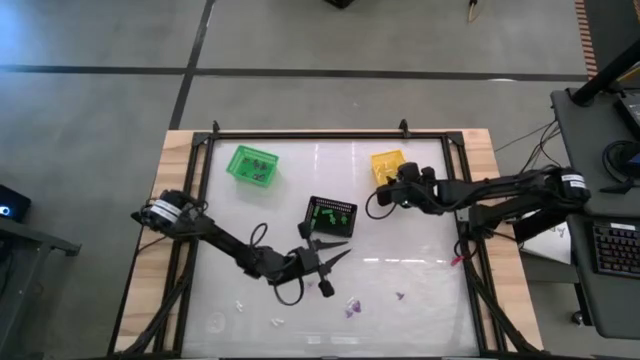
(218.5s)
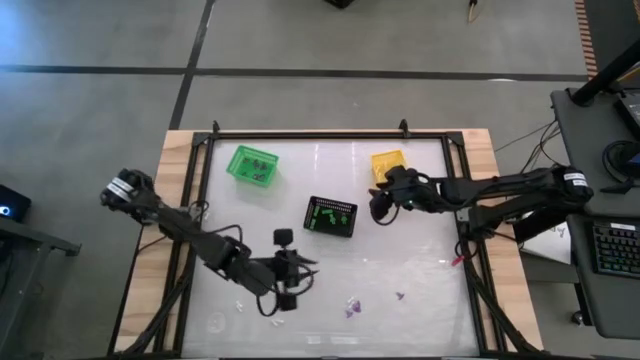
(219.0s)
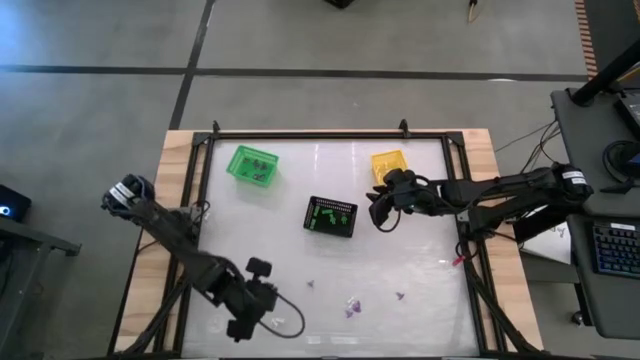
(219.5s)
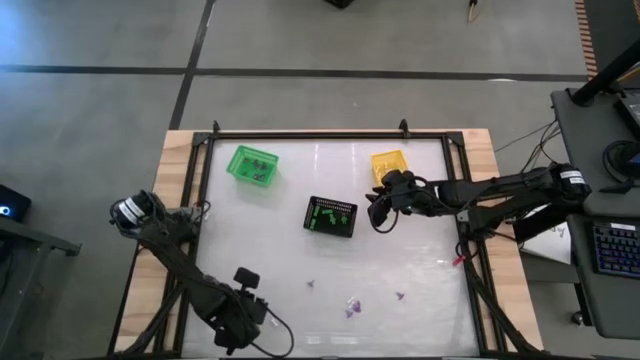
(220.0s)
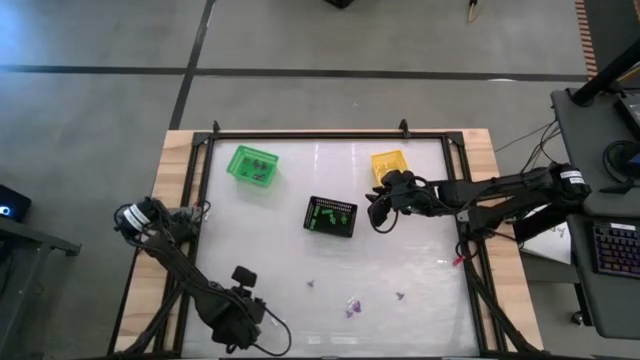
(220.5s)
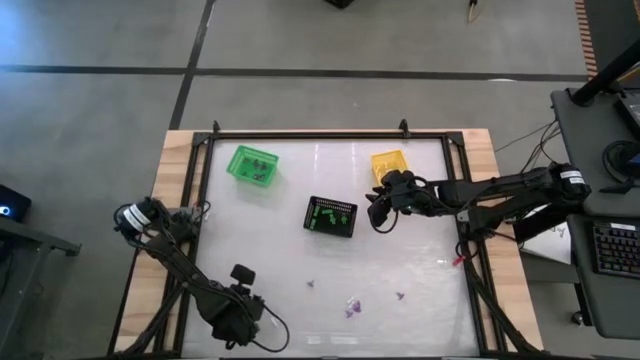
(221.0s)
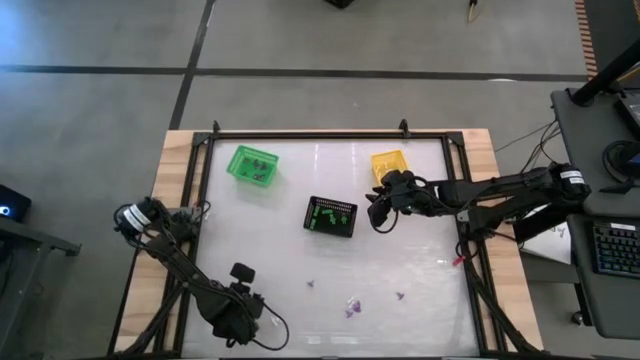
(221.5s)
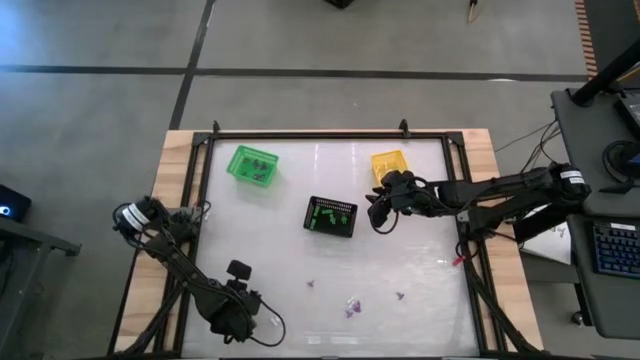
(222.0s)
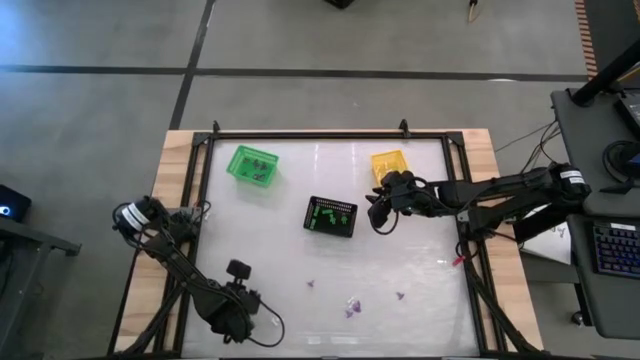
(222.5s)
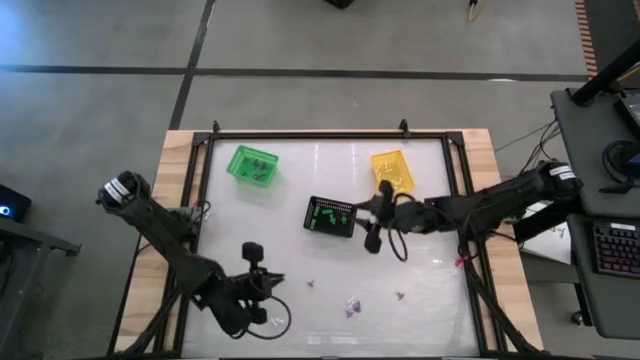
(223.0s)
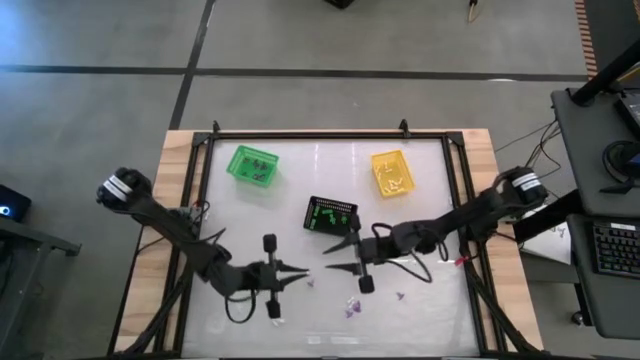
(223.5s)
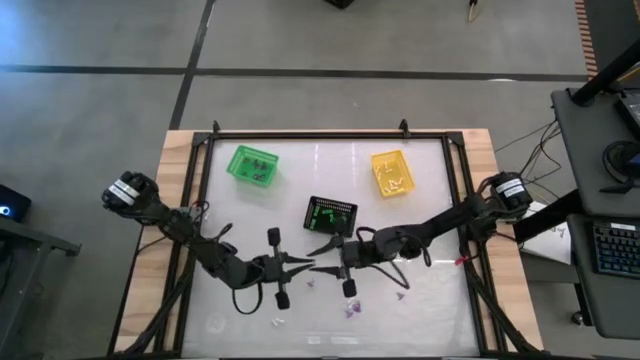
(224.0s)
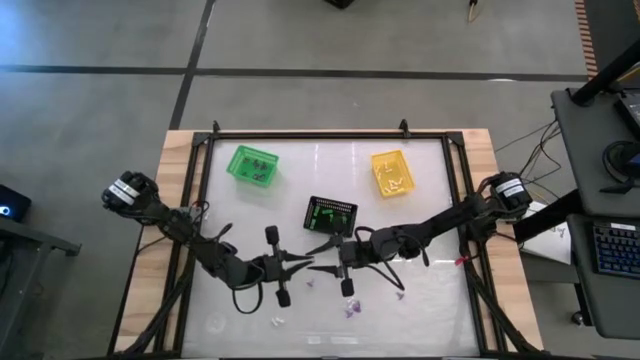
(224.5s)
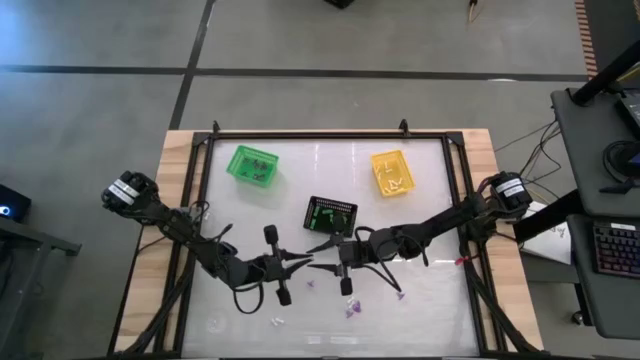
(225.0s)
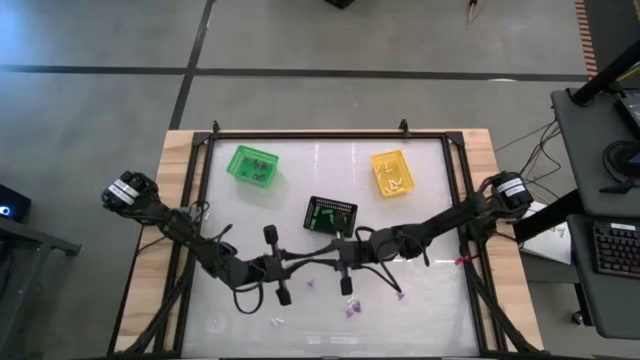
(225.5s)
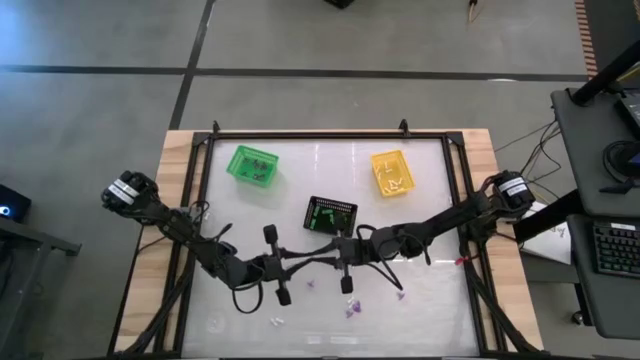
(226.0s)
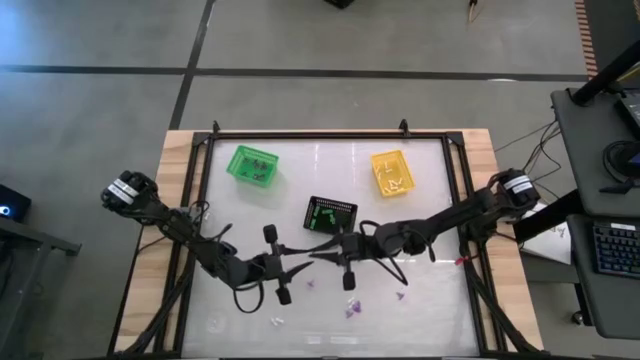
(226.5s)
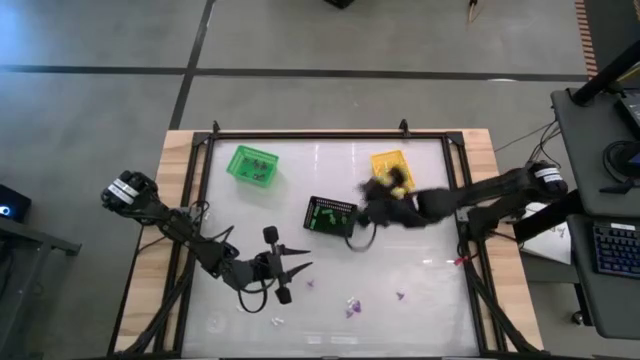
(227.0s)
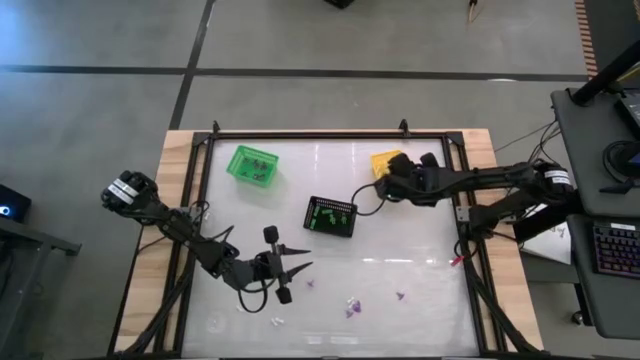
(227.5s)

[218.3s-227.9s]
Task: Sort Halloween decoration
Put the white bone toy into the yellow bin

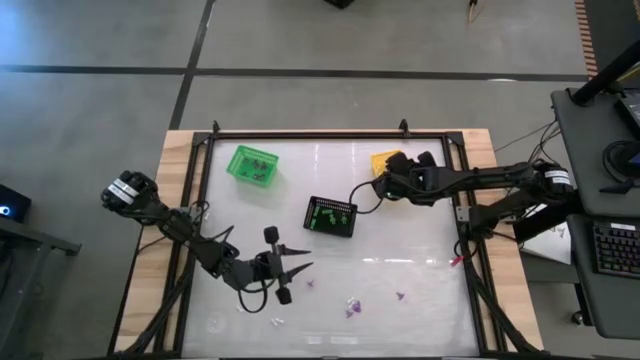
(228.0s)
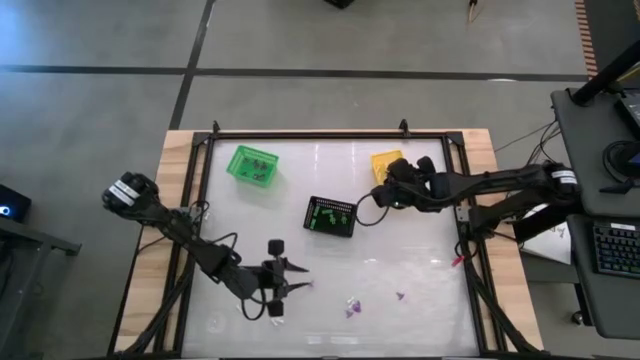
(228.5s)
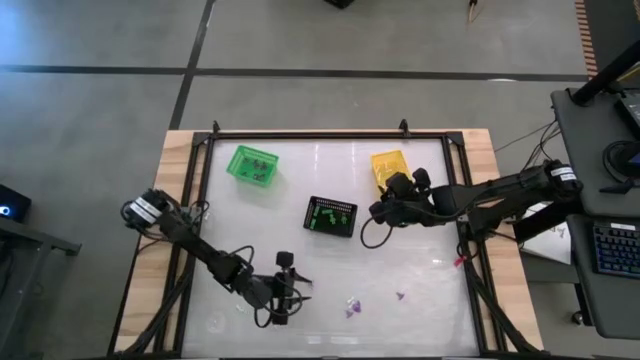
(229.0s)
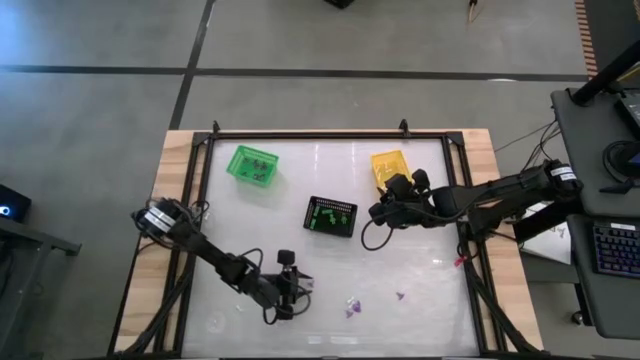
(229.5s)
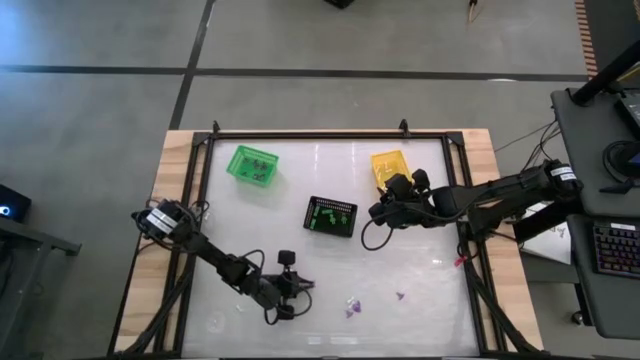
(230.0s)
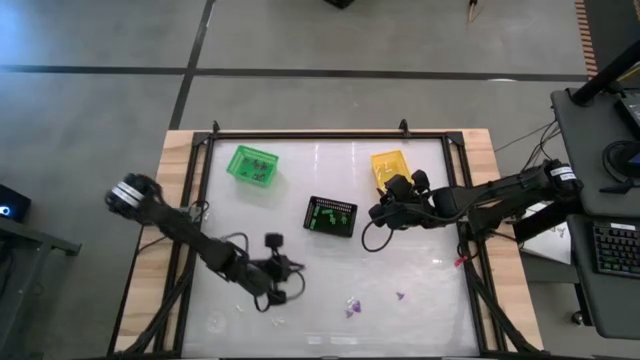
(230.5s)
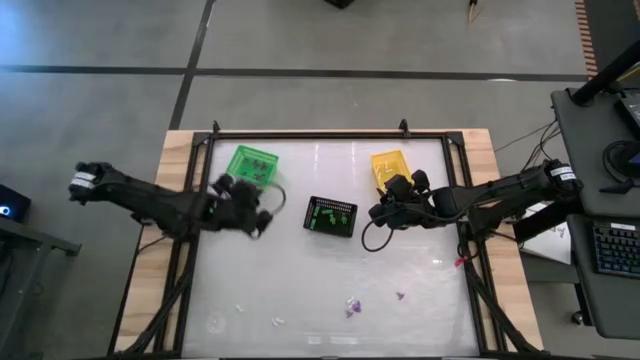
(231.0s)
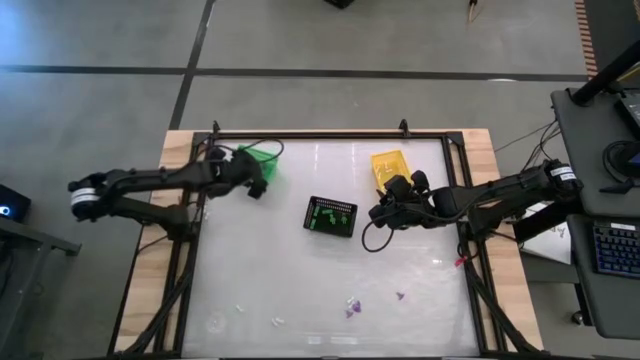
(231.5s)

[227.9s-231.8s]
Put the purple witch hat toy into the green bin

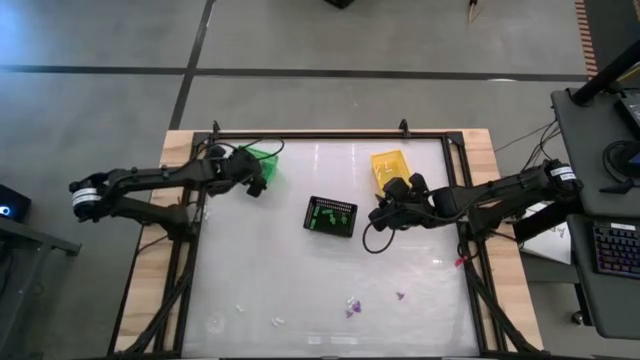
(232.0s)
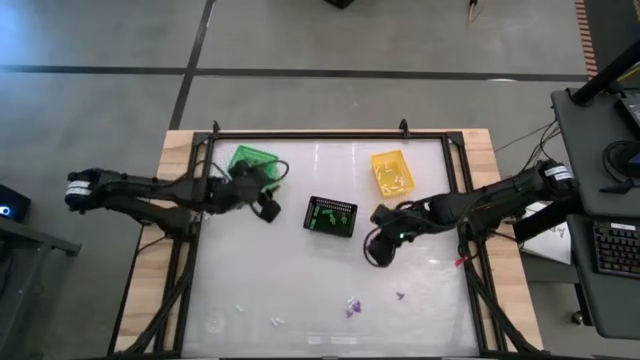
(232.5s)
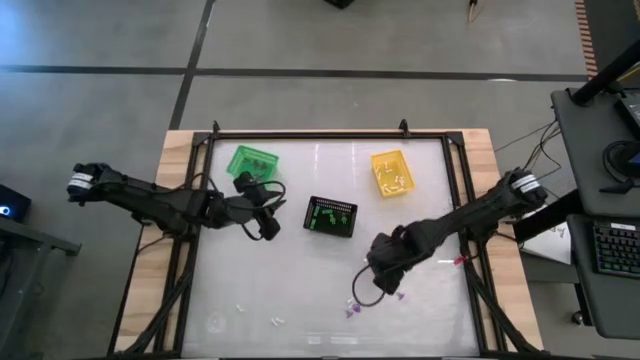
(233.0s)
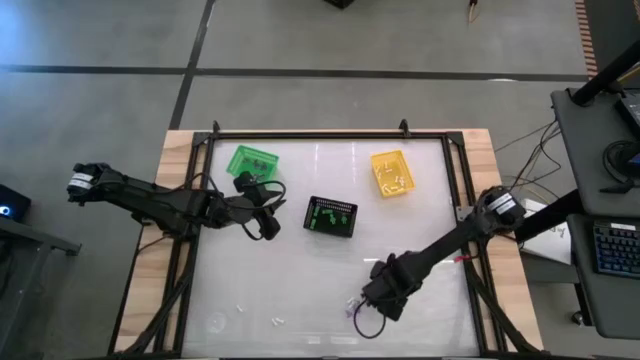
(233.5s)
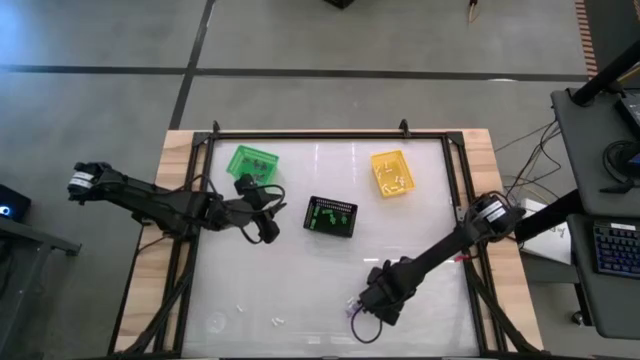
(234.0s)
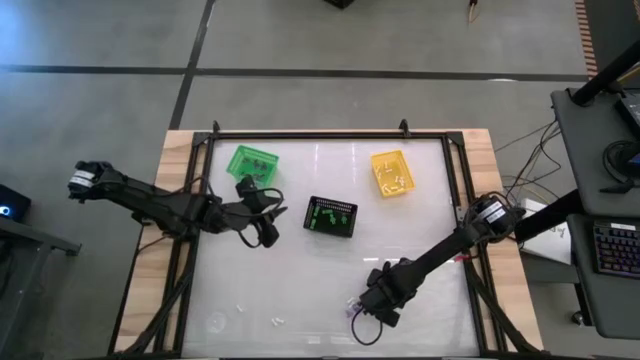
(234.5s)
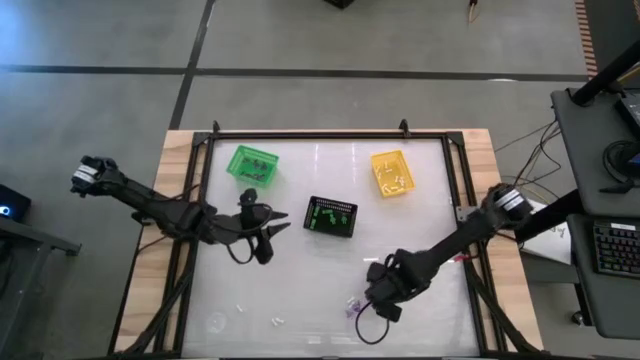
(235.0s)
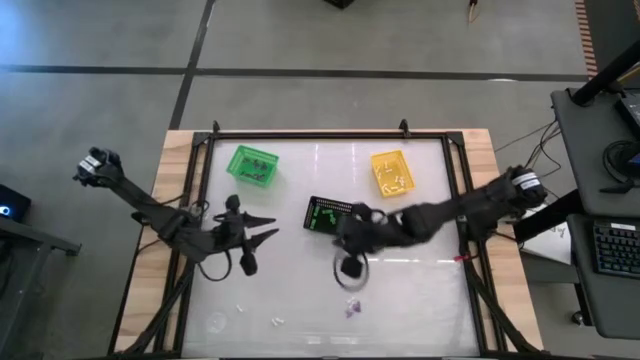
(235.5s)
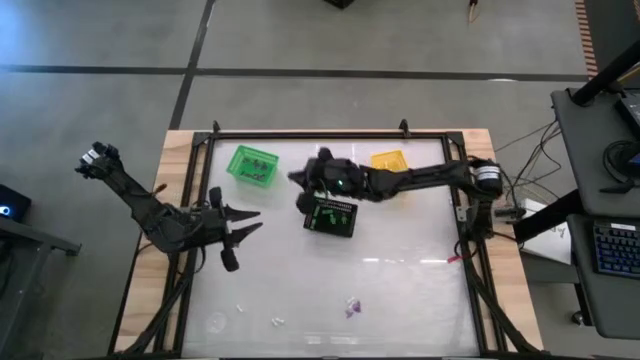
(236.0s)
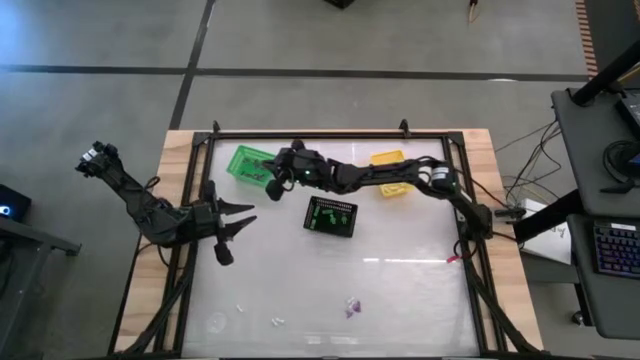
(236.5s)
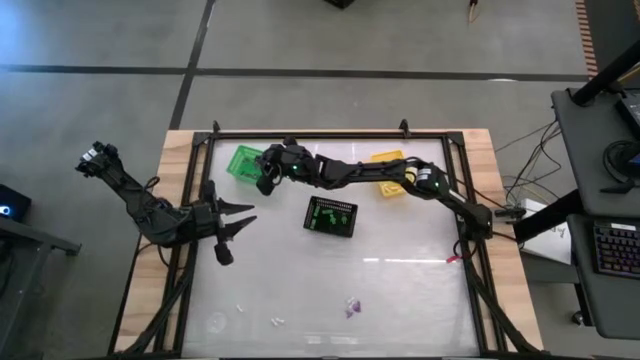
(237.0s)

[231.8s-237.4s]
Put the purple witch hat toy into the green bin

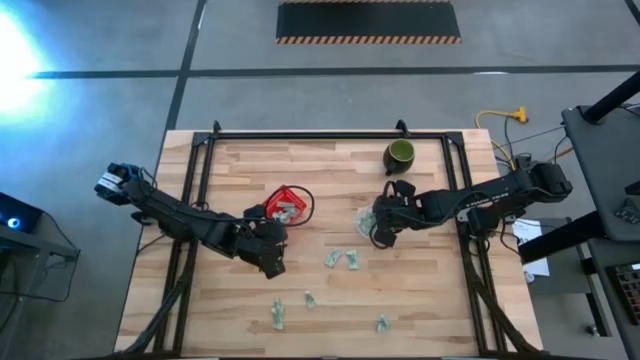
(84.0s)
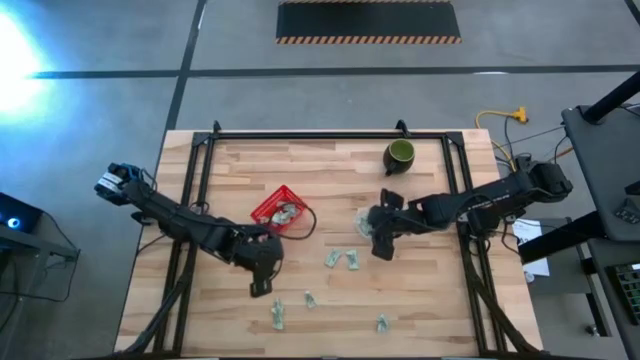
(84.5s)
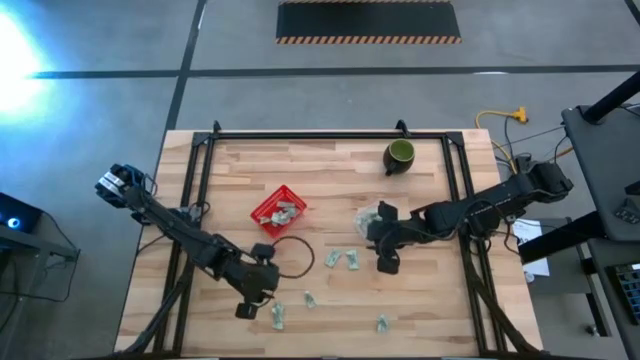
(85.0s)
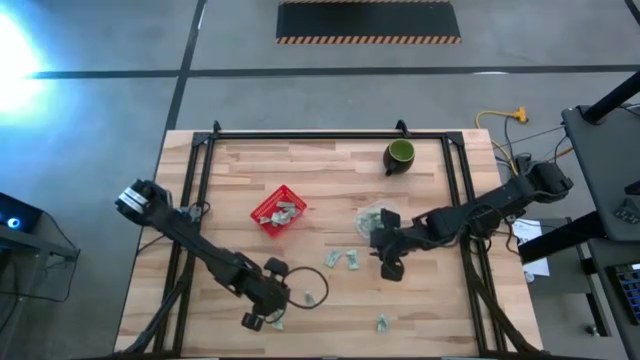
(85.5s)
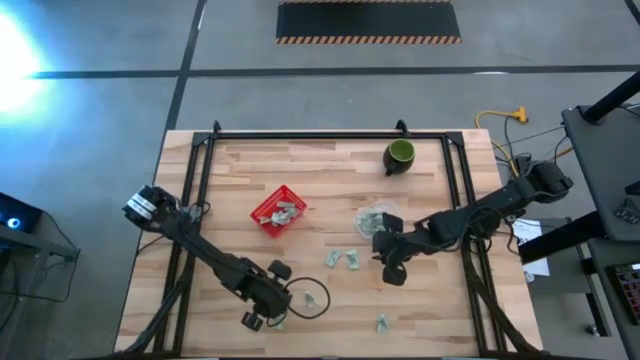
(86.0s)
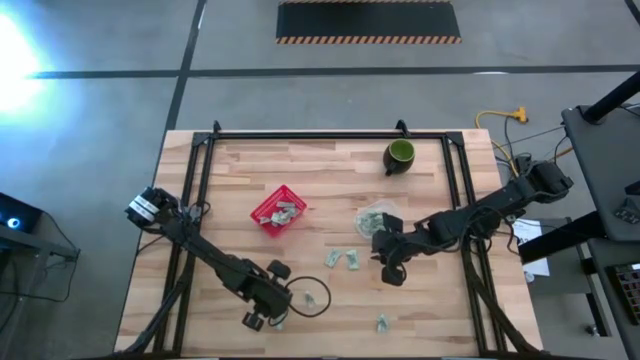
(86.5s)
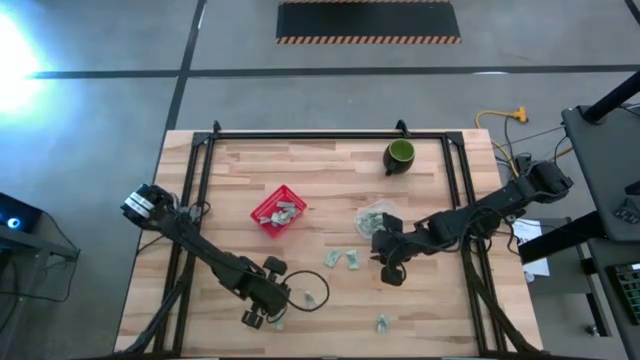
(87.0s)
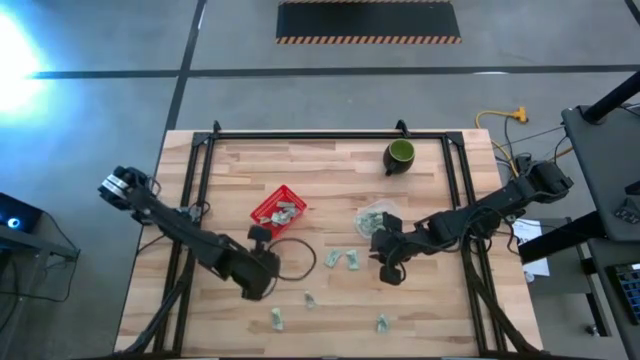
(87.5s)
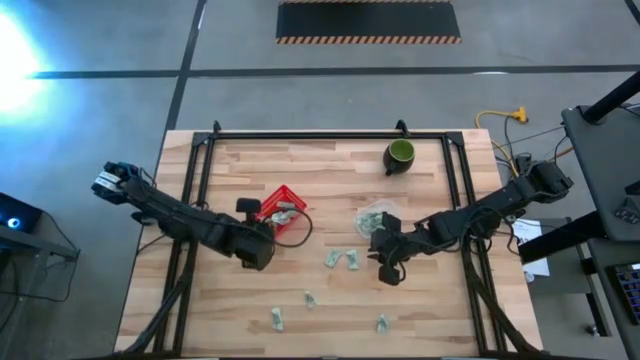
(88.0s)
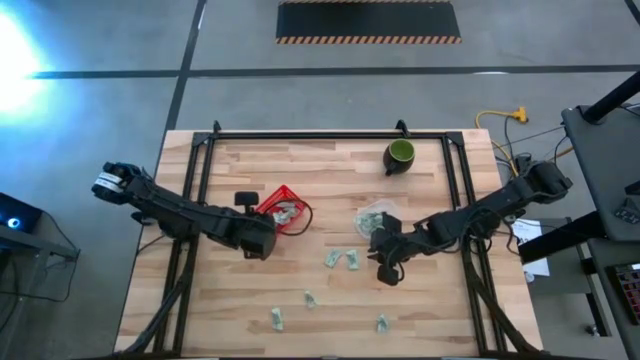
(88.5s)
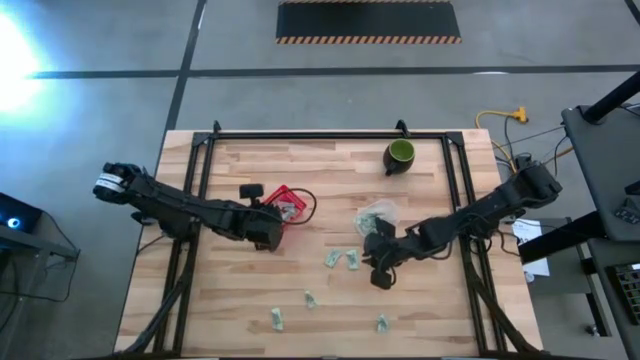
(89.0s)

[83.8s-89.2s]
Task: Pick and place items into bin
Put the stevia packet into the red bin
